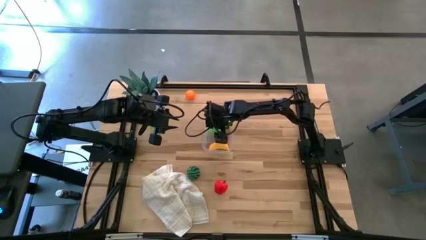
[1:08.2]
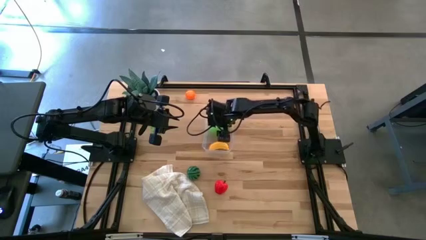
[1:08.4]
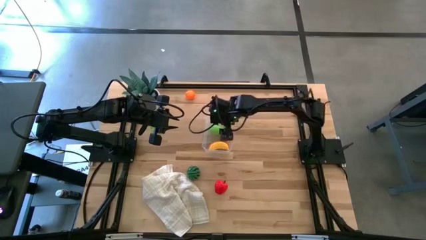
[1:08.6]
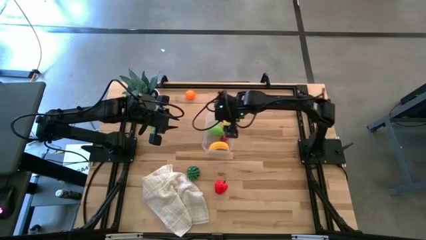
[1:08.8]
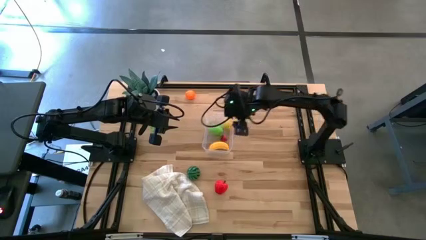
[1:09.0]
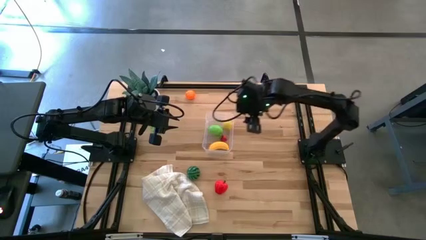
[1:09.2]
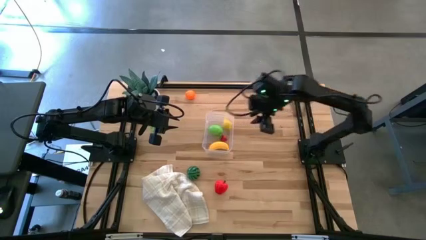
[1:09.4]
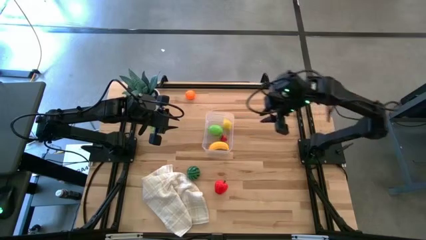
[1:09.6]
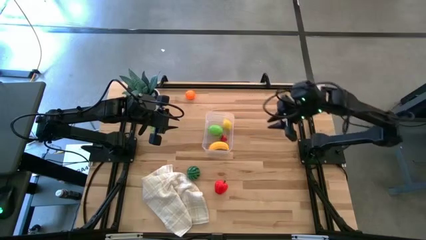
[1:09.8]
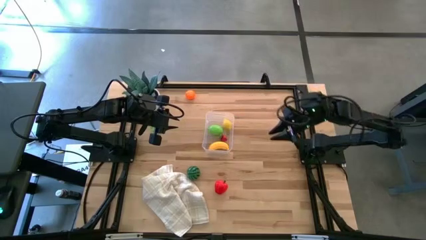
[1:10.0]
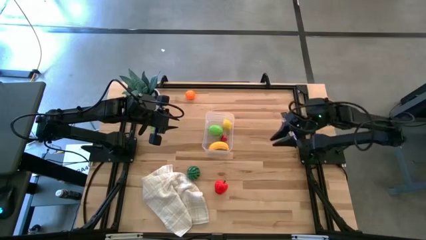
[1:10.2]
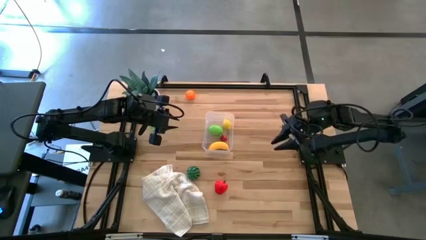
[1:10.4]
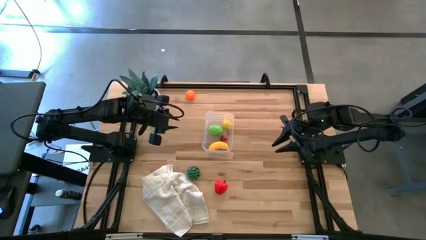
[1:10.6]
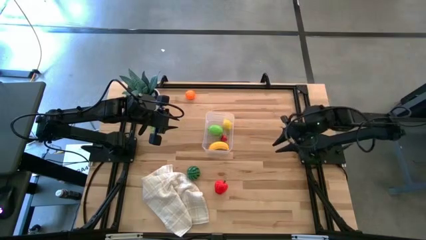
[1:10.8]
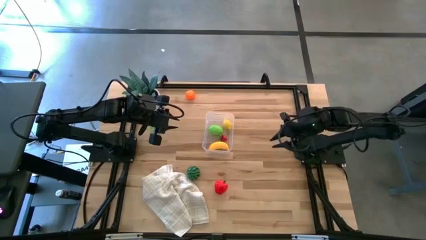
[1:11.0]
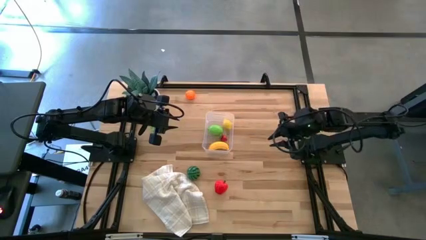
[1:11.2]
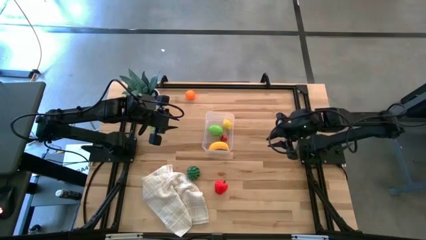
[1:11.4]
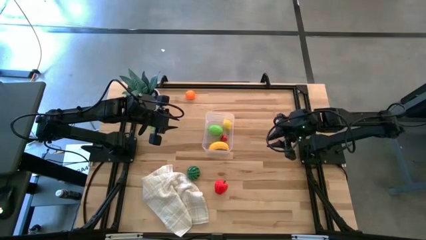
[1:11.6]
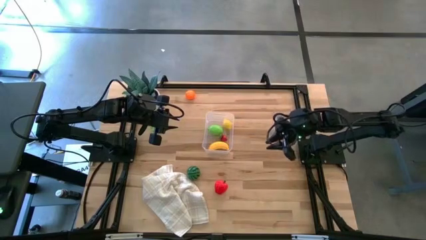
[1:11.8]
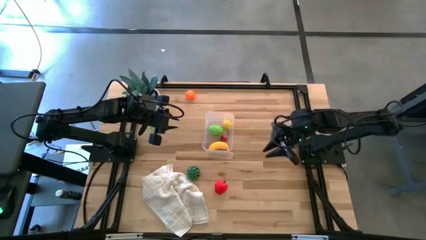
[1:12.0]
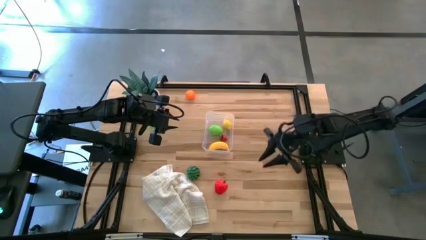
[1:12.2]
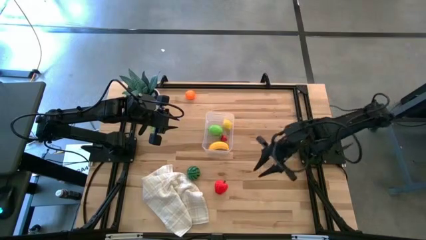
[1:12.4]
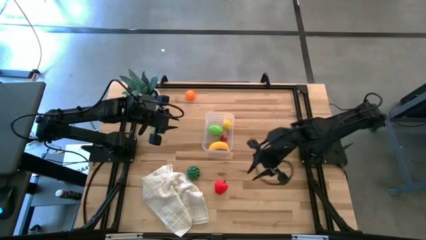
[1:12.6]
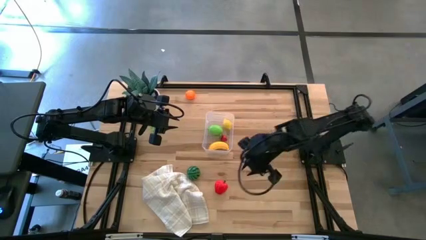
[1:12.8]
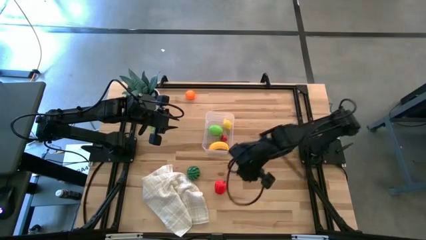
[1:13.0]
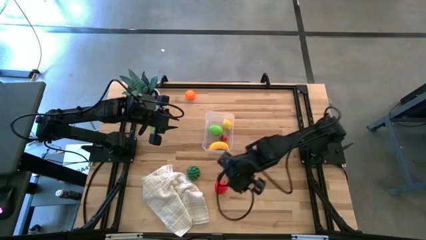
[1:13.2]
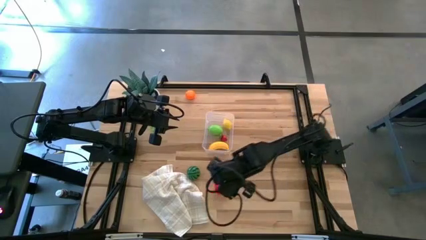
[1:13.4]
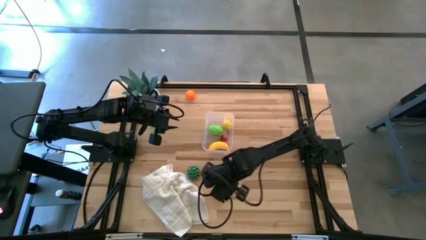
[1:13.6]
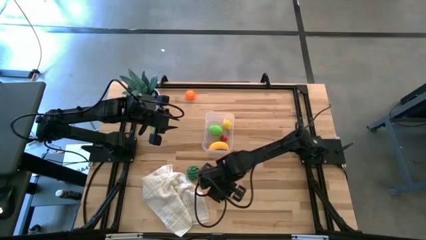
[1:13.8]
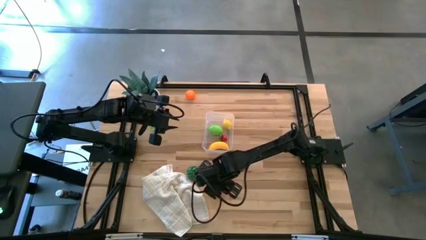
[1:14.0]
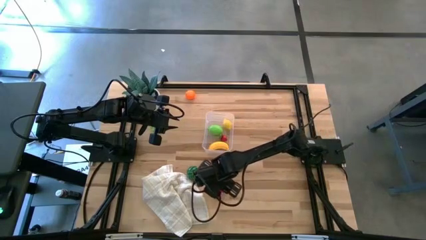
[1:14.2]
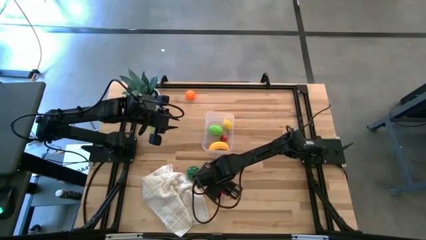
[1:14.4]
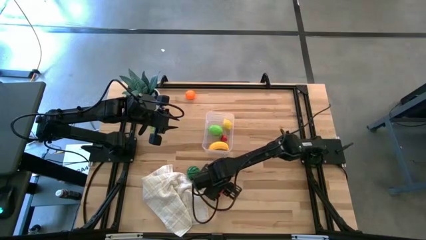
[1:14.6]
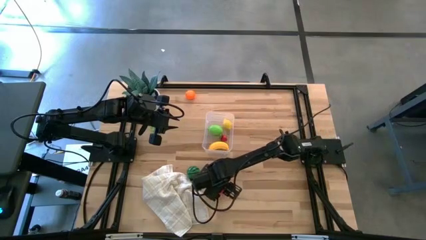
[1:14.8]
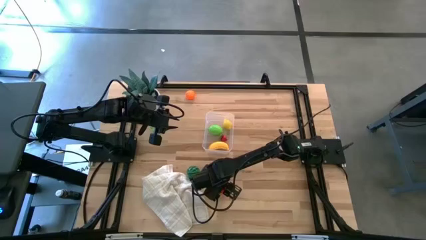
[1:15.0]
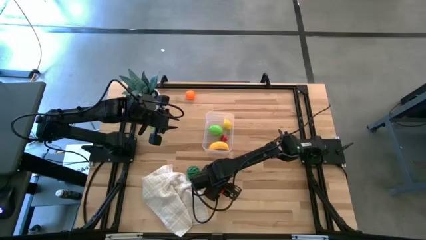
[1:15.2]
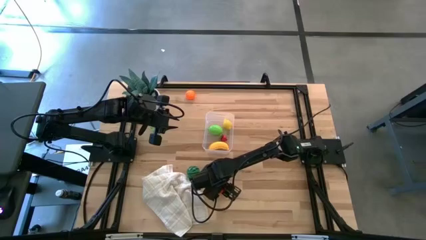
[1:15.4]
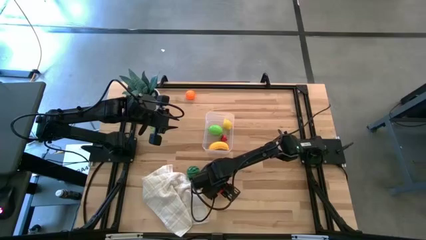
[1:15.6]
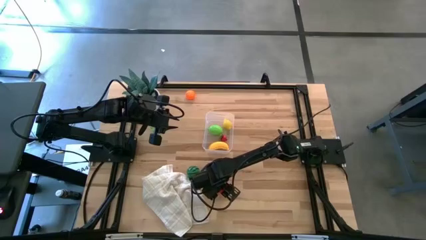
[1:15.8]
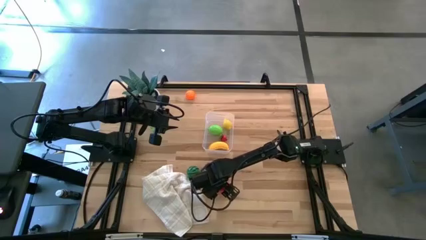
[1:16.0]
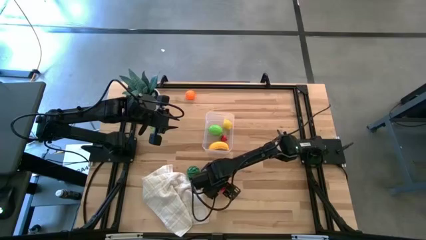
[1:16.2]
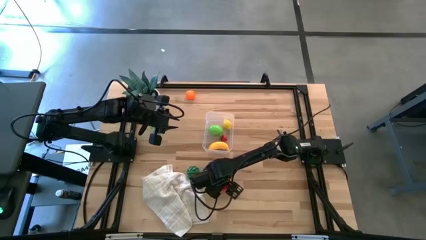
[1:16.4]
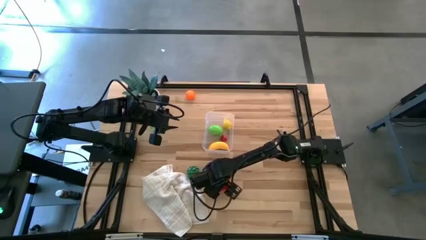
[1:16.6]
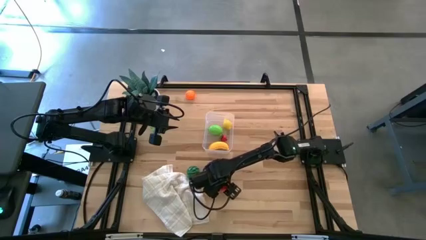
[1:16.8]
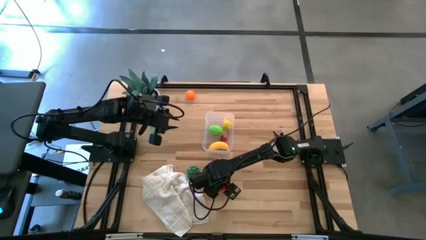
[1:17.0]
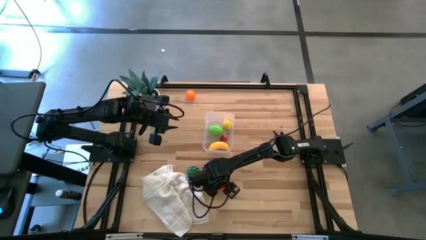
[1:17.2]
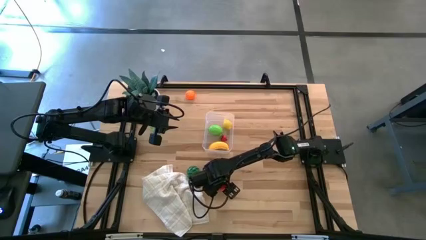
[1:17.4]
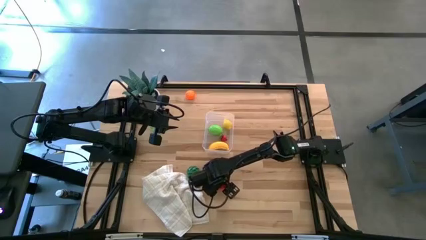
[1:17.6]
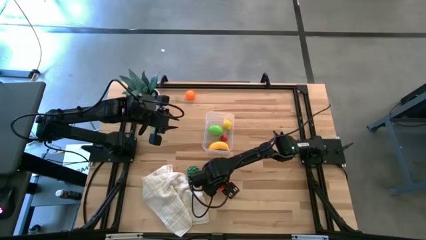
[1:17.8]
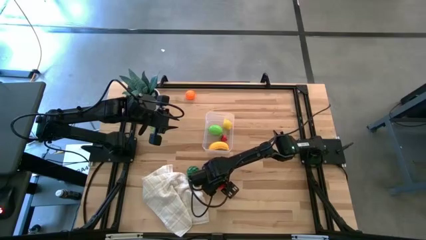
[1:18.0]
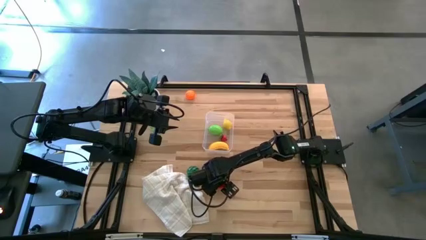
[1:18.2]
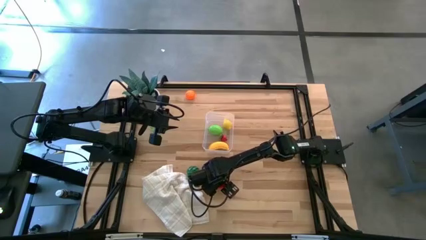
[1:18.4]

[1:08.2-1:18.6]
Task: Pick and placing Produce into tupperware
Put the red apple into the transparent bin
